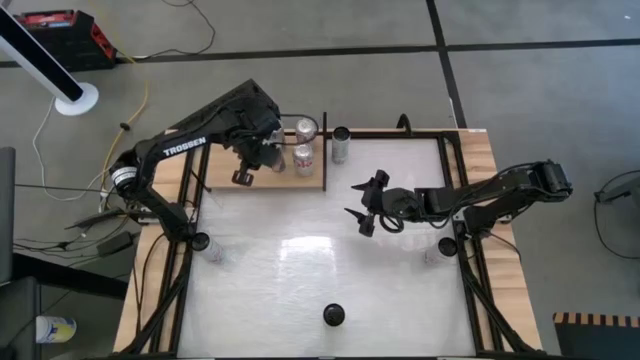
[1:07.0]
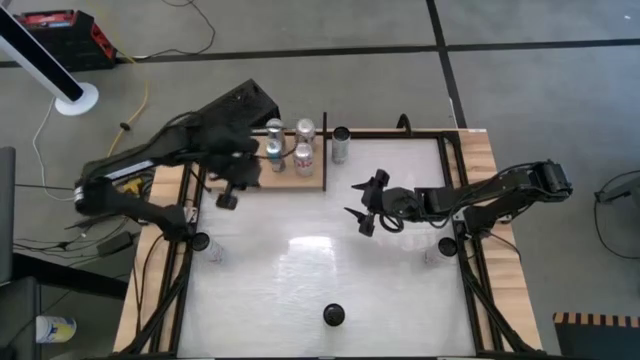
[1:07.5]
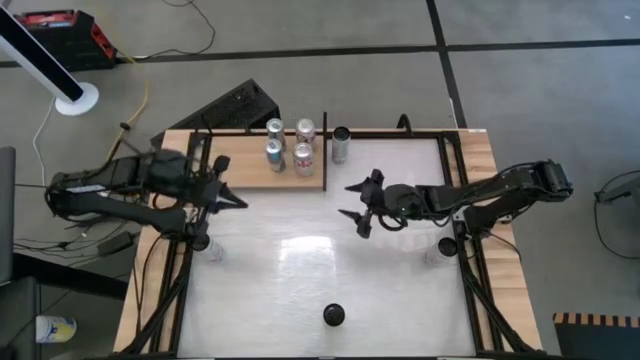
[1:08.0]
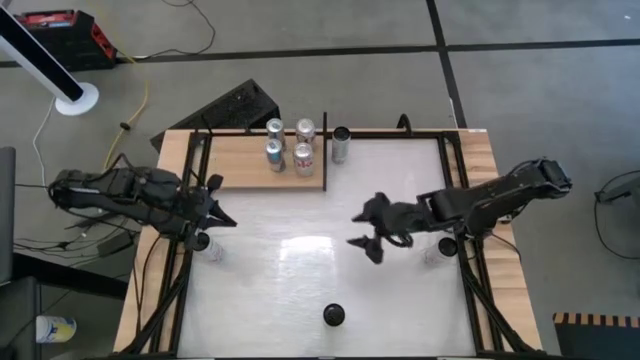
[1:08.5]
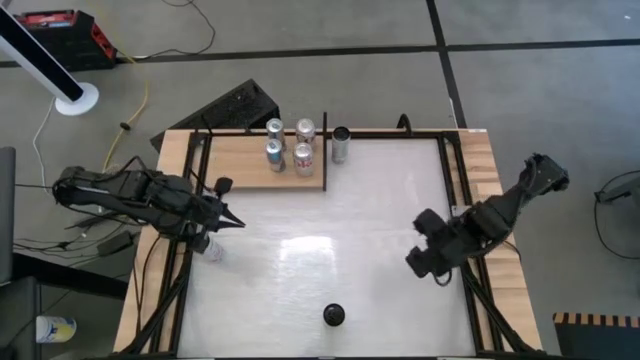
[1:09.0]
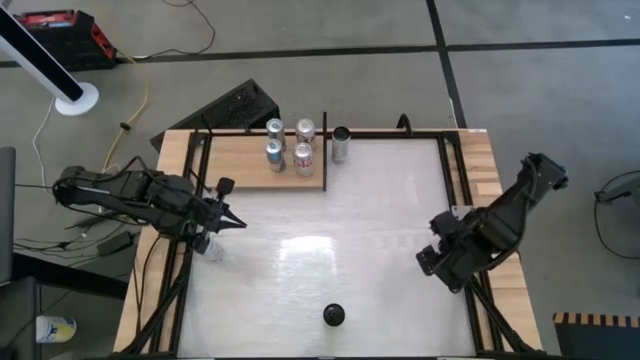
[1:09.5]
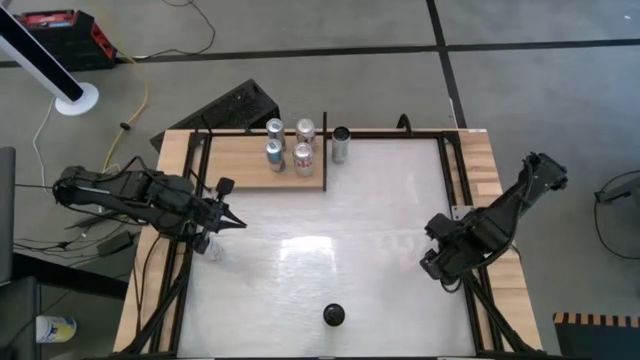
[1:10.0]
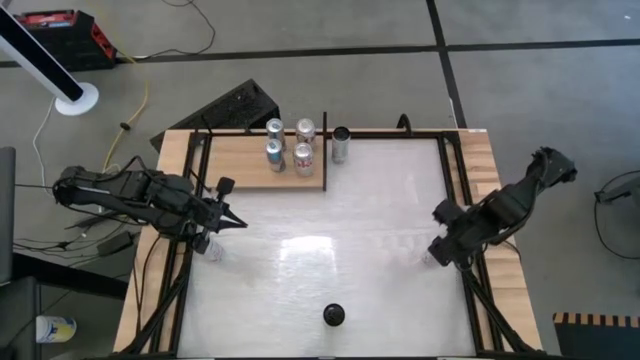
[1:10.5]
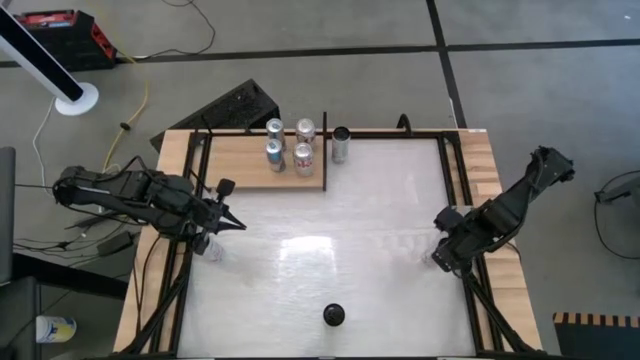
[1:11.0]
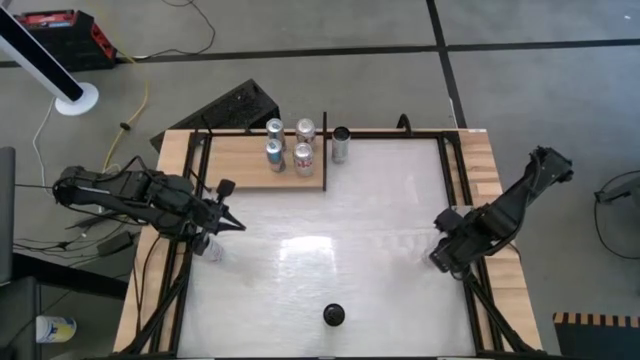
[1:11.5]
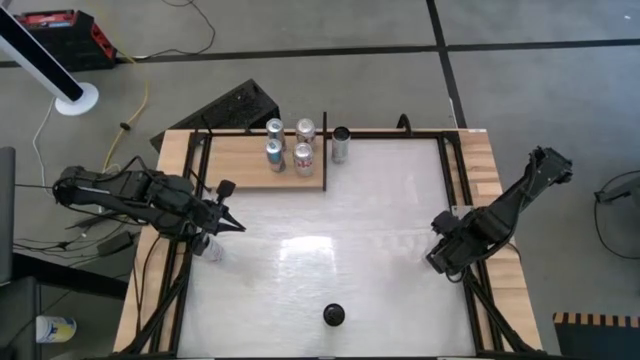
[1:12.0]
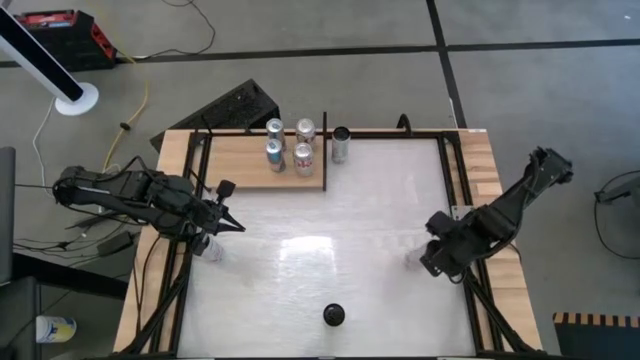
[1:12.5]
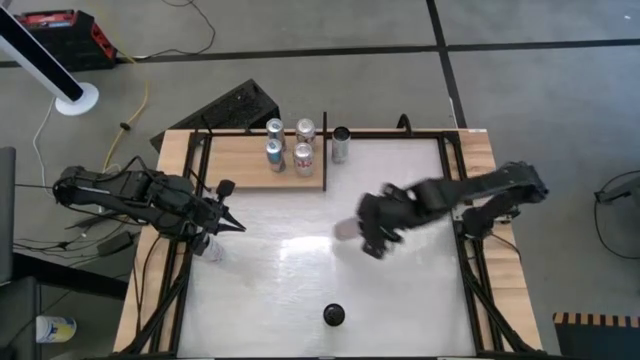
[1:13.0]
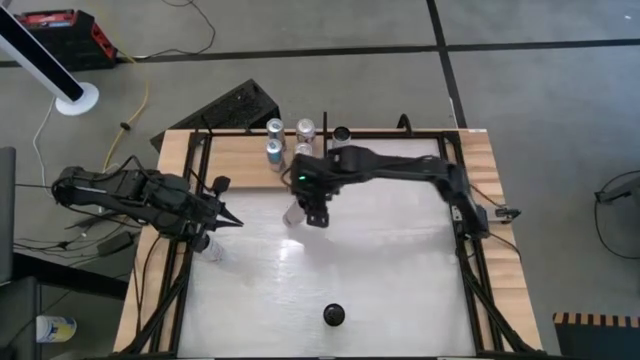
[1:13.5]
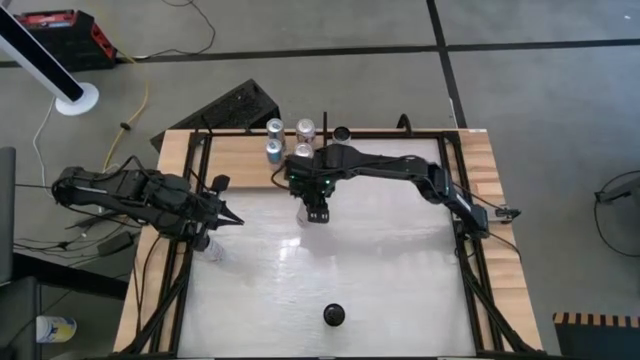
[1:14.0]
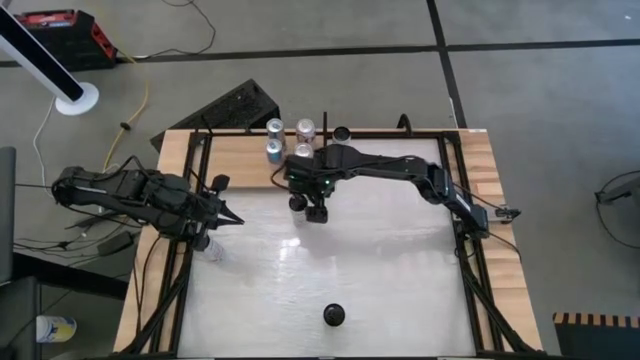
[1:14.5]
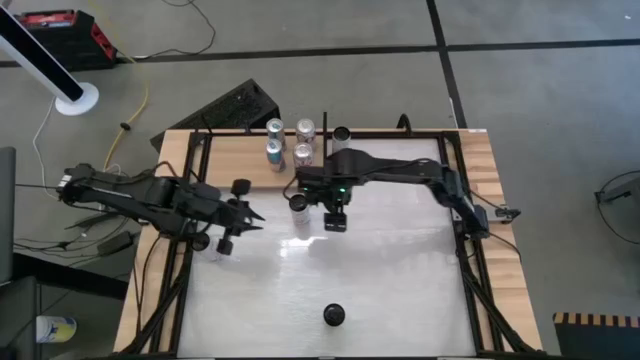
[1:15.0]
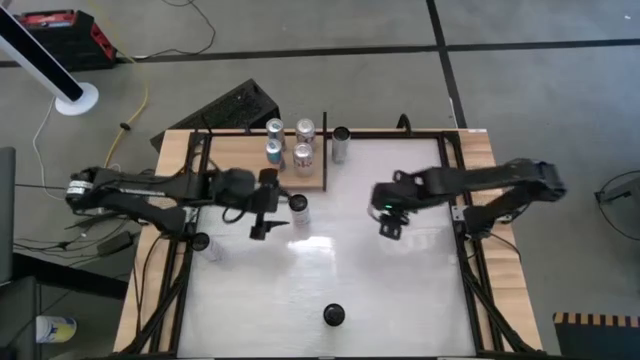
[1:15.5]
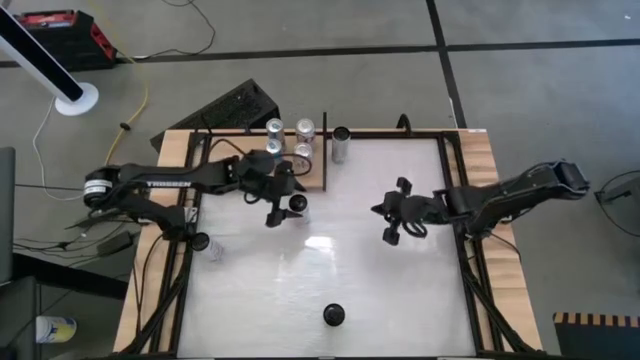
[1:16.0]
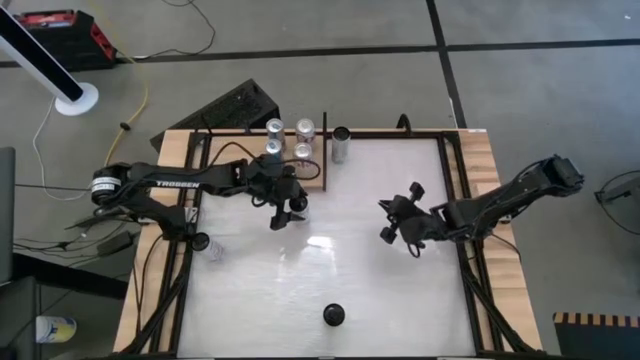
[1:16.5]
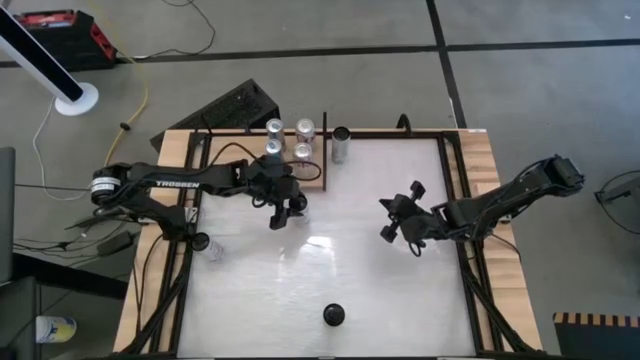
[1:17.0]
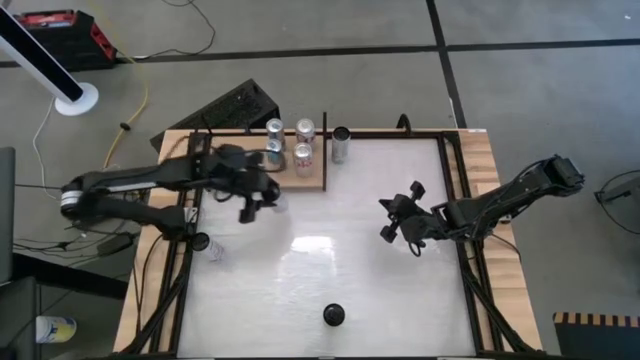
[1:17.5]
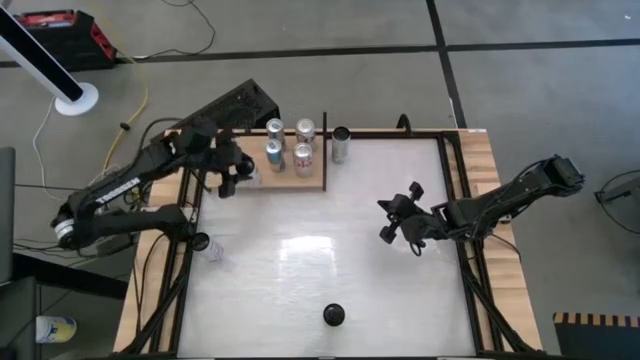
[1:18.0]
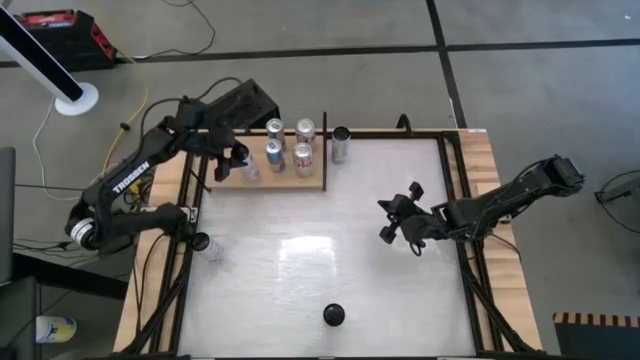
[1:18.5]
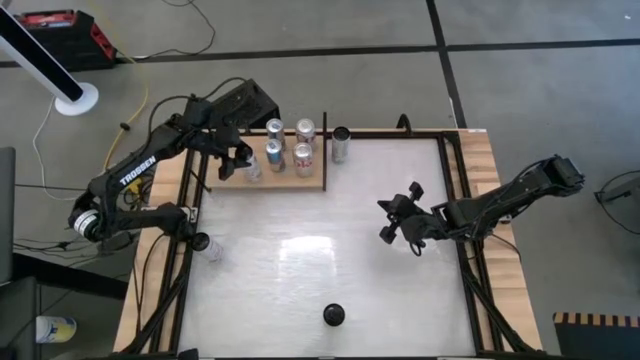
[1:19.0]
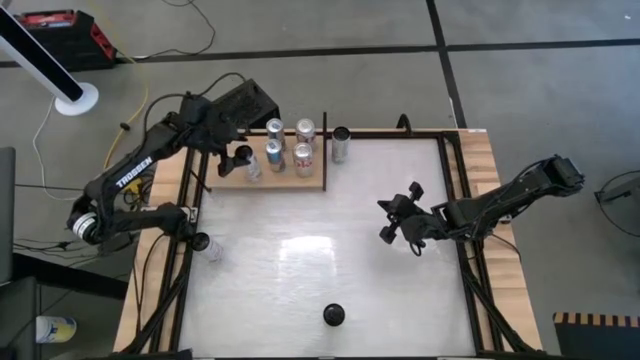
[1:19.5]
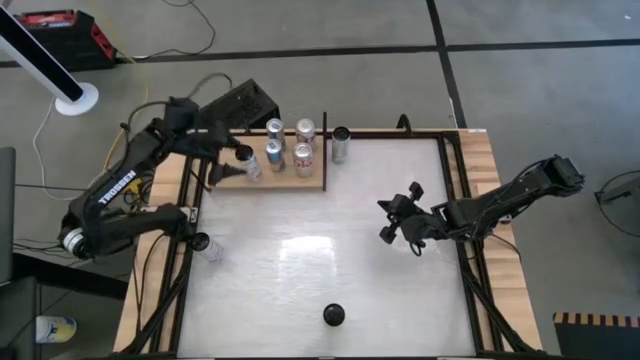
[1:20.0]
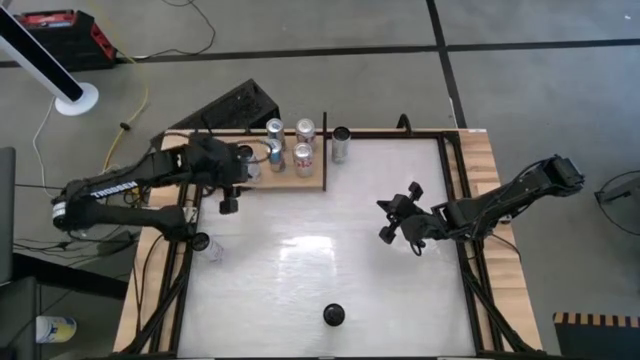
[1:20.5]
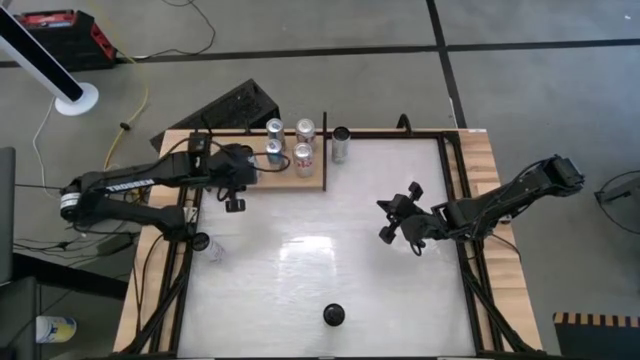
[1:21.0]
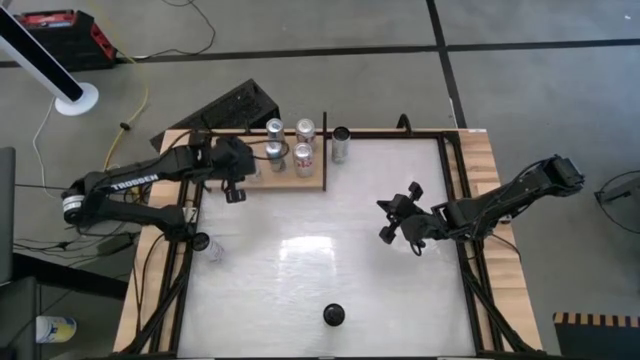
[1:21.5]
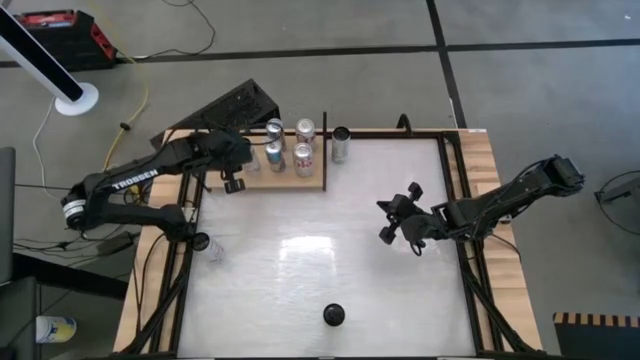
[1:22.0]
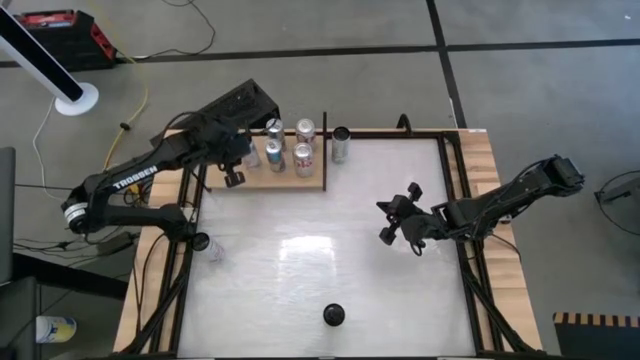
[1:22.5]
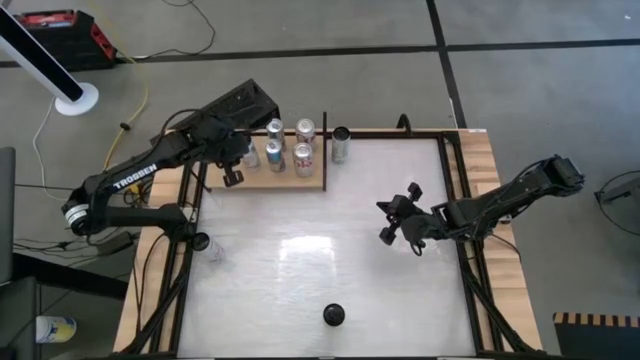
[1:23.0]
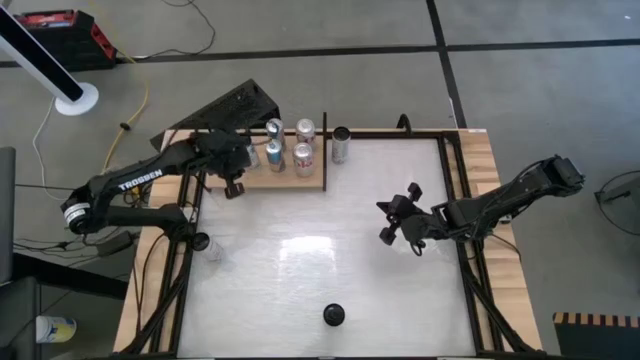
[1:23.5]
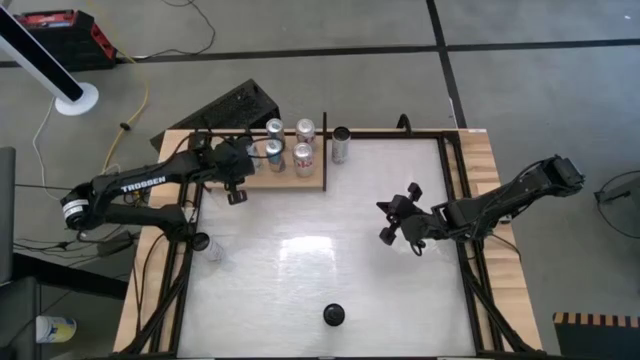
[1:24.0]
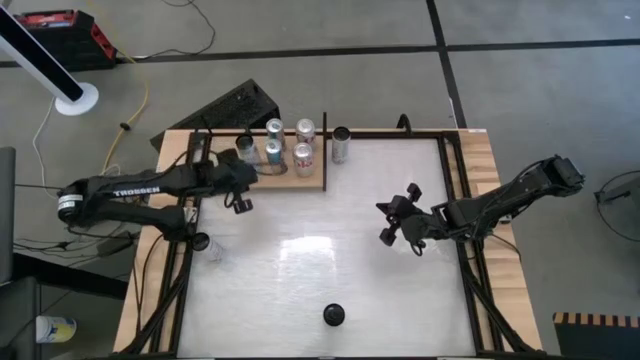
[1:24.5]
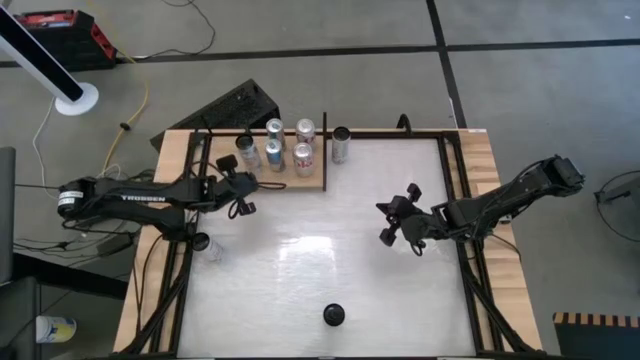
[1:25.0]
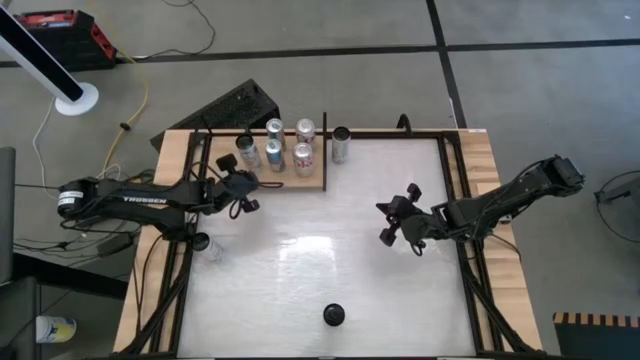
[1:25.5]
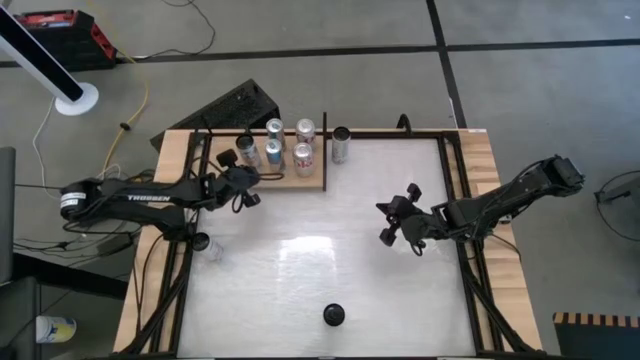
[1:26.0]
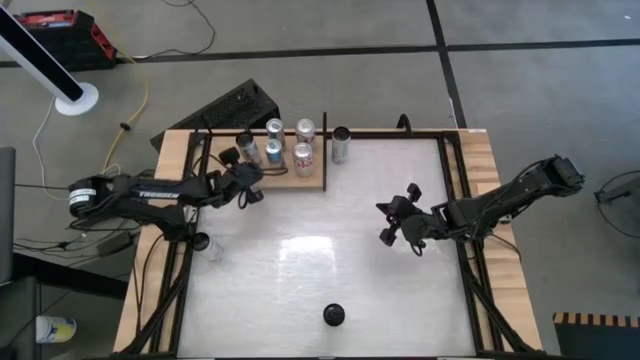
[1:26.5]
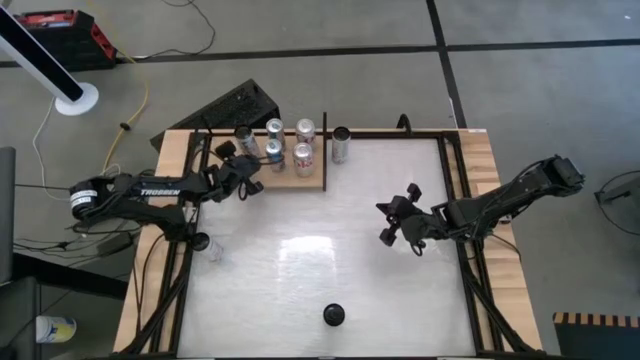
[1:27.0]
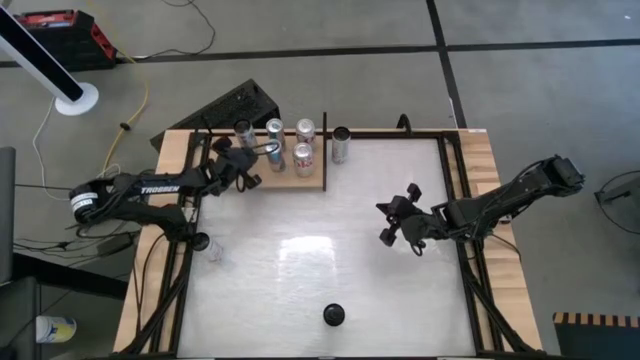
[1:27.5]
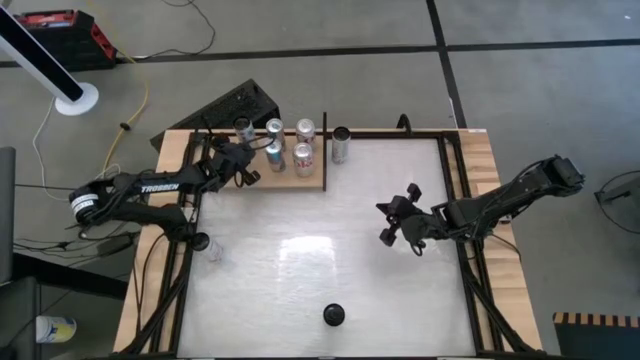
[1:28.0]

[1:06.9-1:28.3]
Task: Place canned beverage on shelf
Put the right white-pink soda can on the shelf
